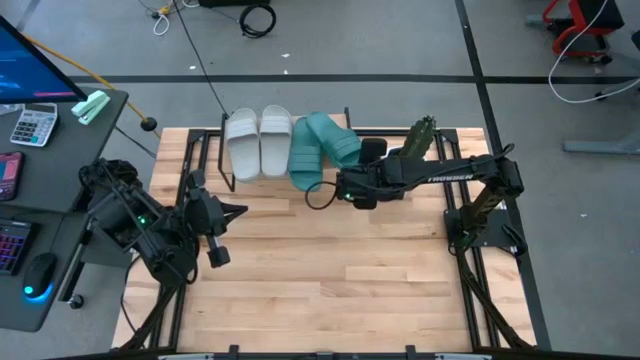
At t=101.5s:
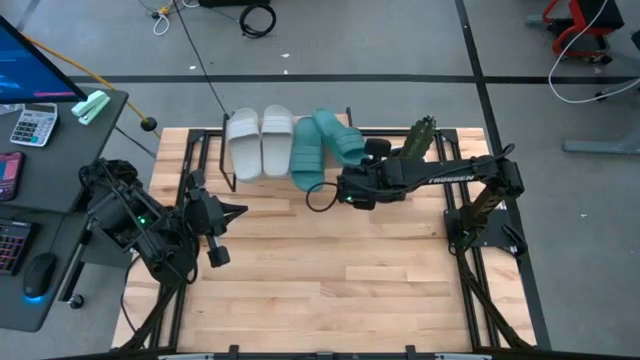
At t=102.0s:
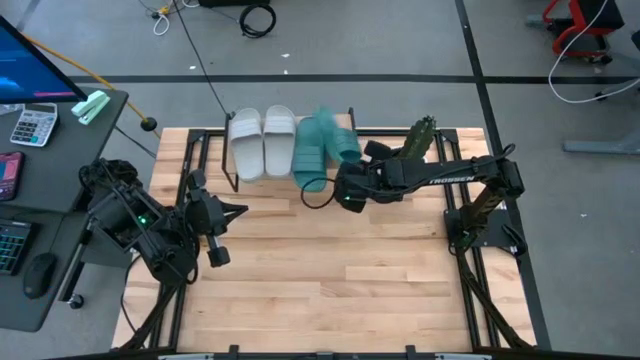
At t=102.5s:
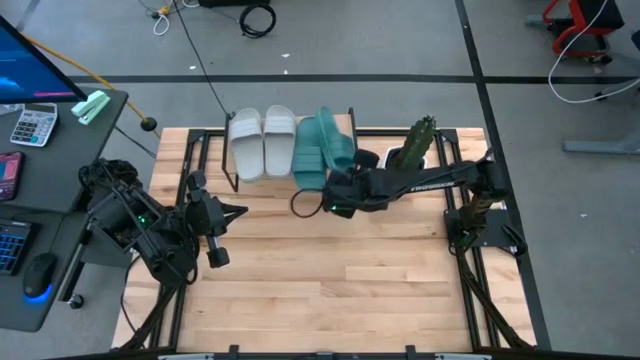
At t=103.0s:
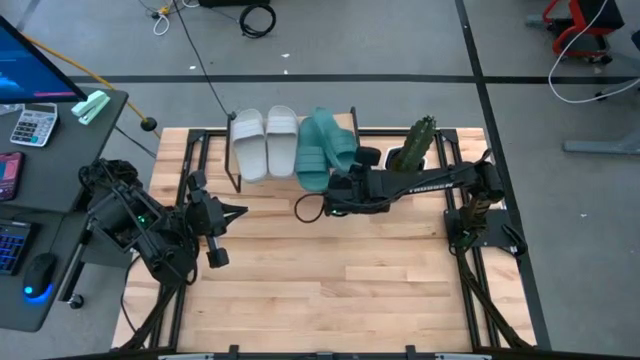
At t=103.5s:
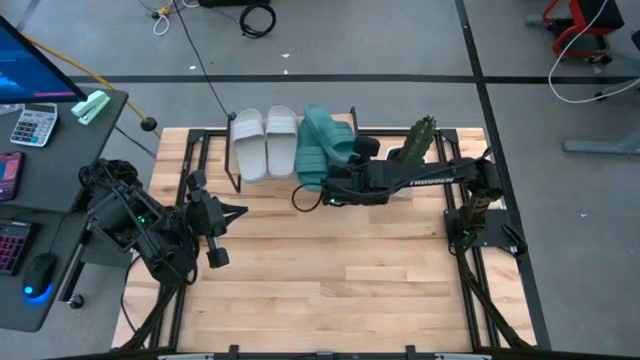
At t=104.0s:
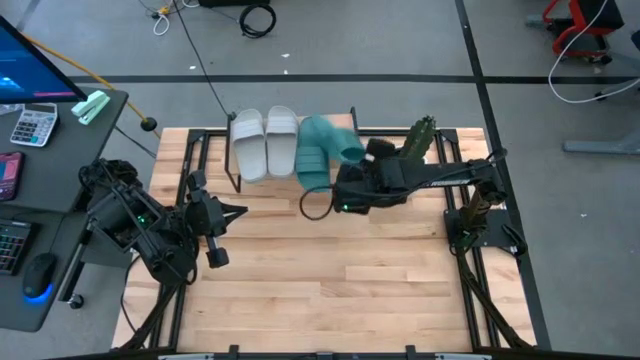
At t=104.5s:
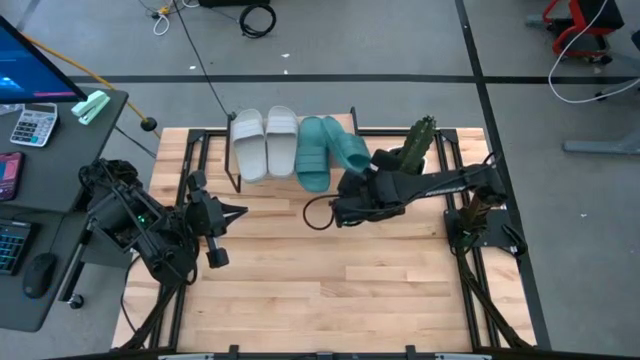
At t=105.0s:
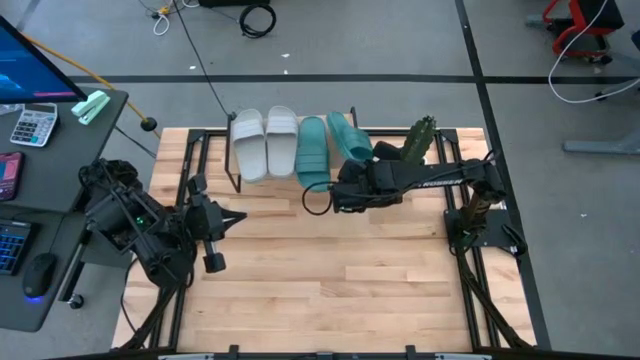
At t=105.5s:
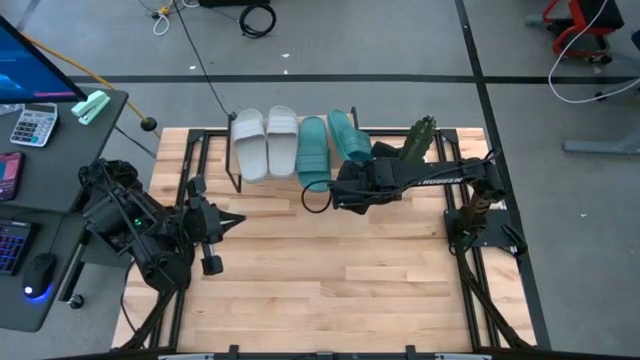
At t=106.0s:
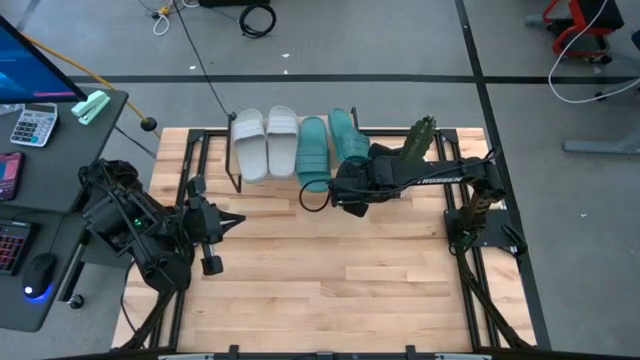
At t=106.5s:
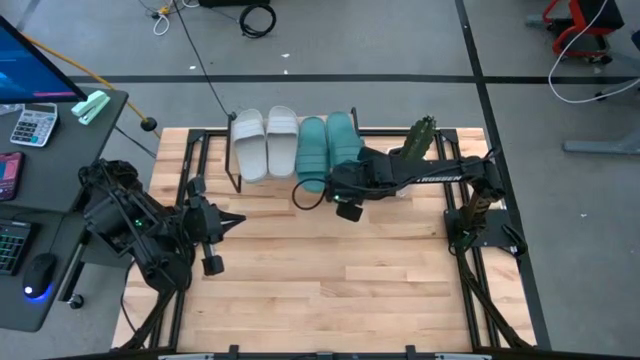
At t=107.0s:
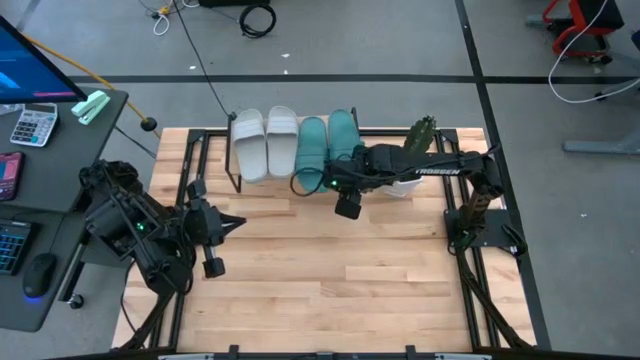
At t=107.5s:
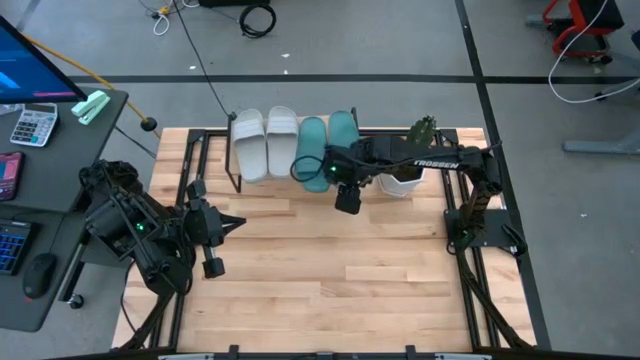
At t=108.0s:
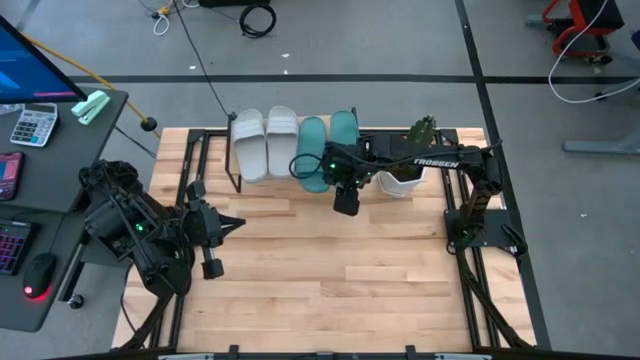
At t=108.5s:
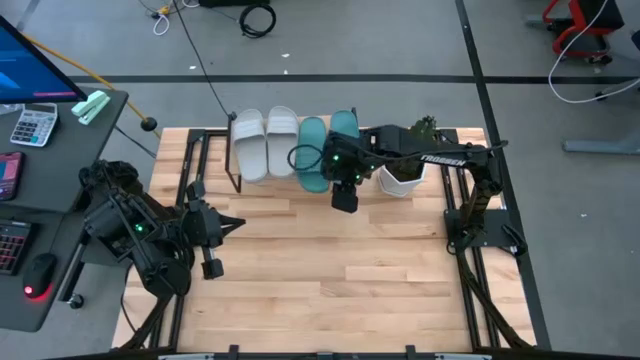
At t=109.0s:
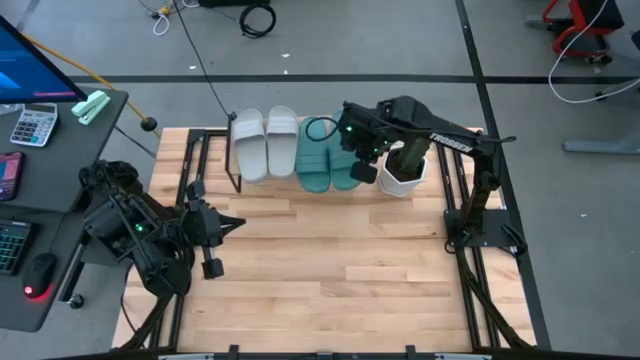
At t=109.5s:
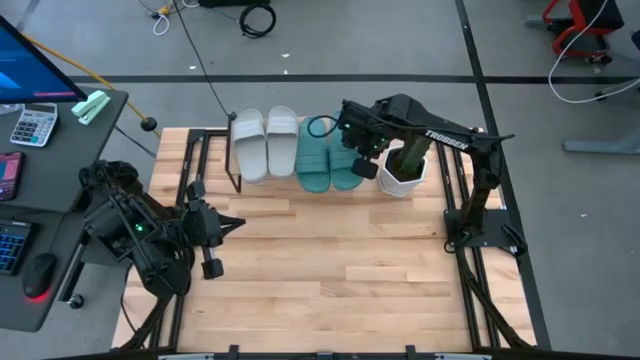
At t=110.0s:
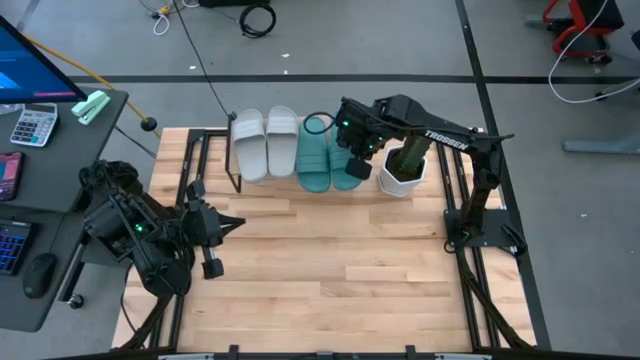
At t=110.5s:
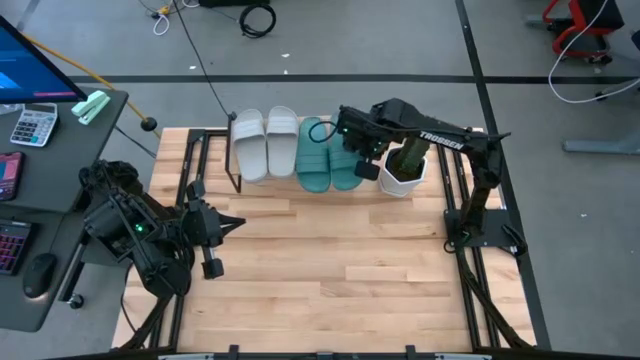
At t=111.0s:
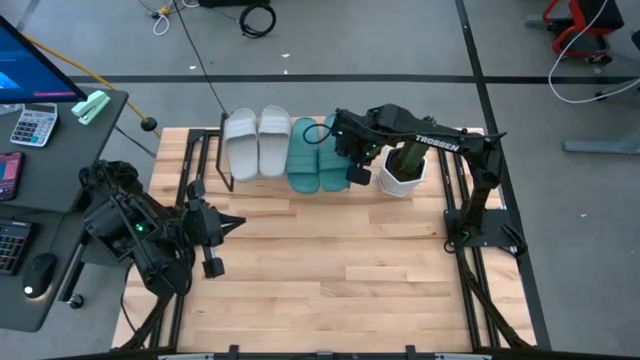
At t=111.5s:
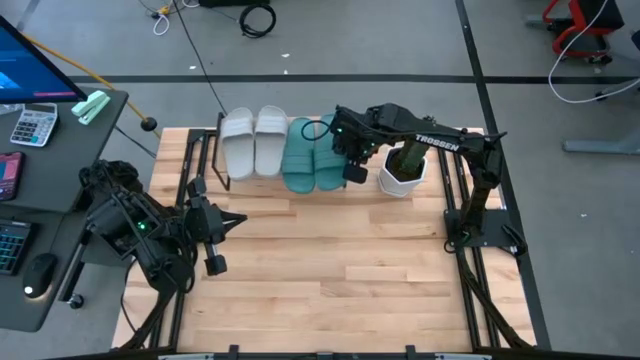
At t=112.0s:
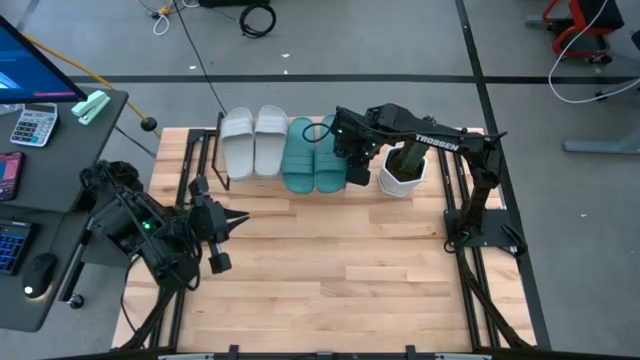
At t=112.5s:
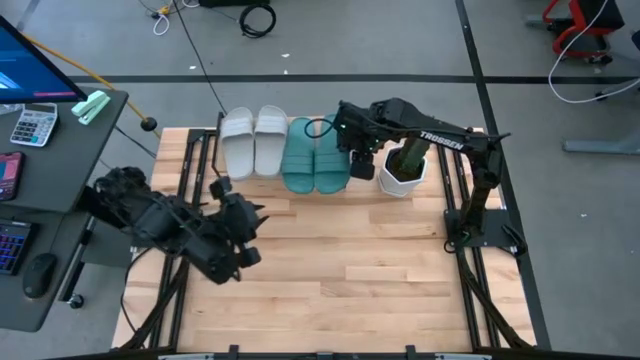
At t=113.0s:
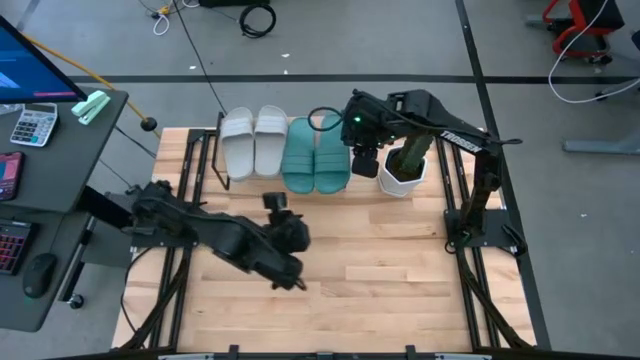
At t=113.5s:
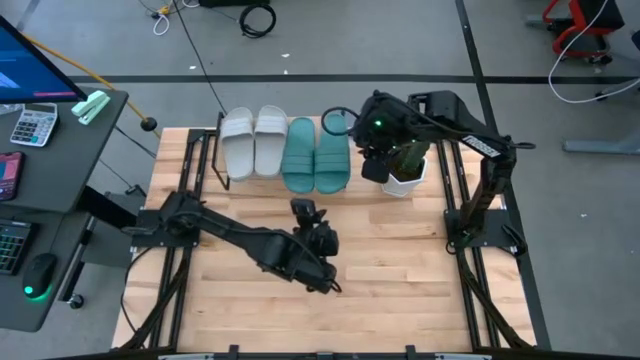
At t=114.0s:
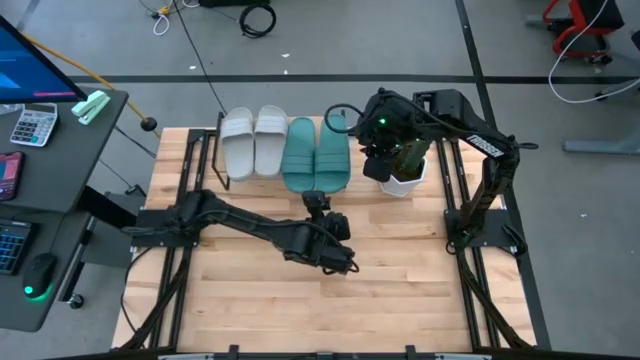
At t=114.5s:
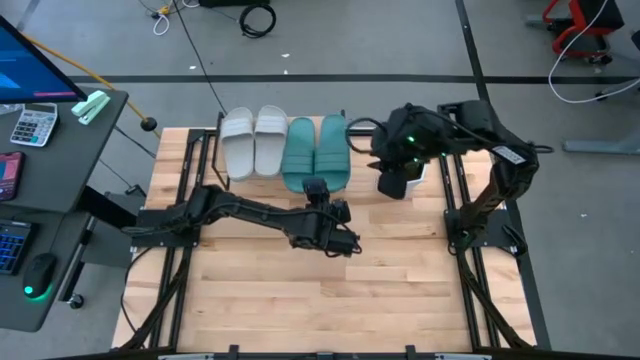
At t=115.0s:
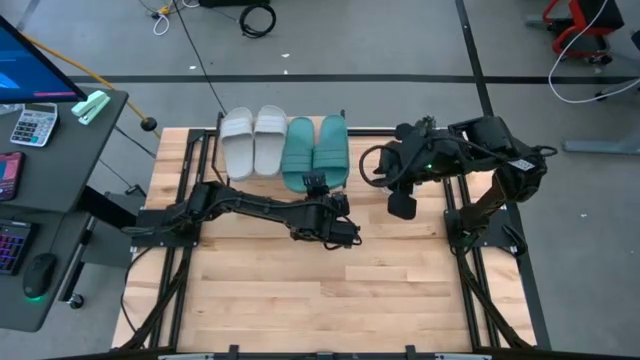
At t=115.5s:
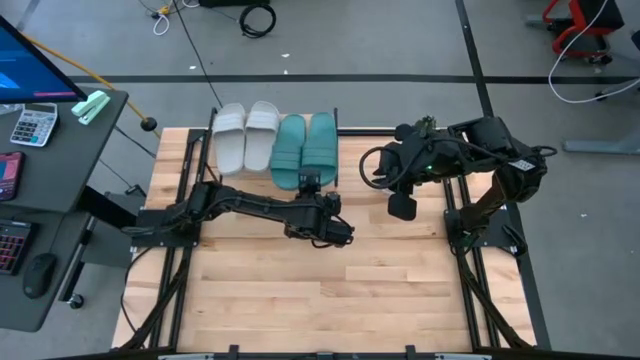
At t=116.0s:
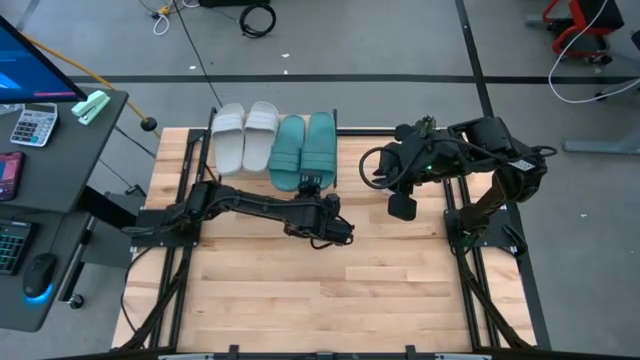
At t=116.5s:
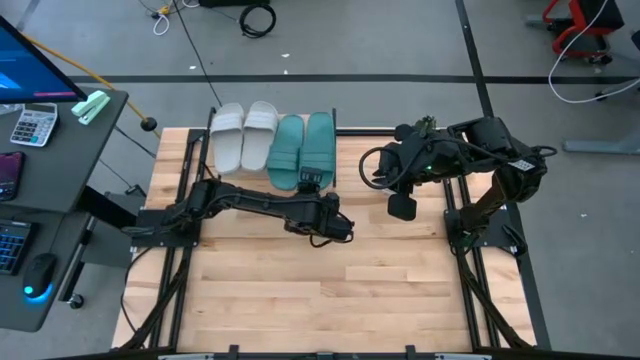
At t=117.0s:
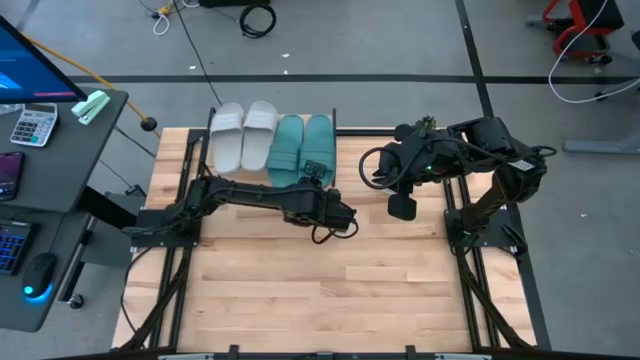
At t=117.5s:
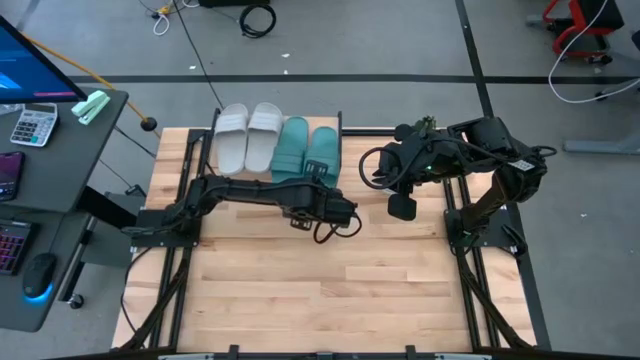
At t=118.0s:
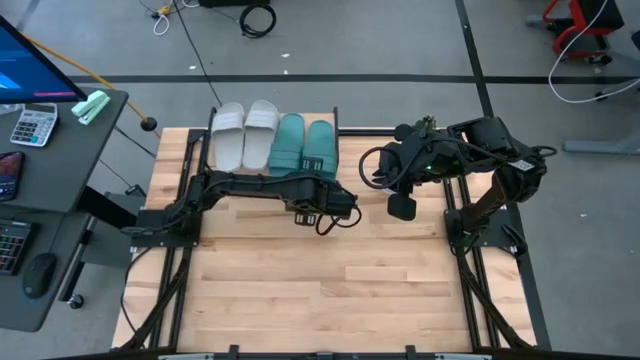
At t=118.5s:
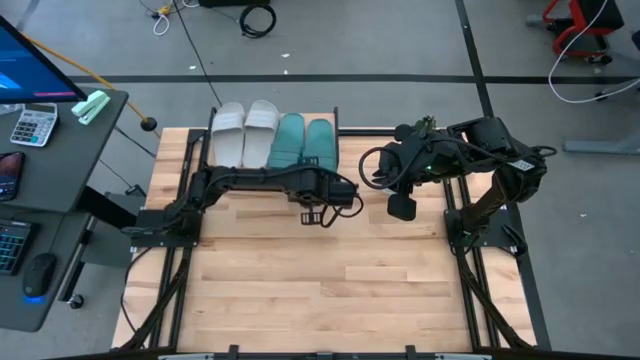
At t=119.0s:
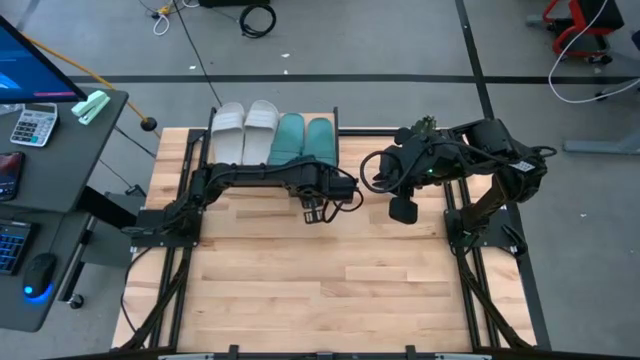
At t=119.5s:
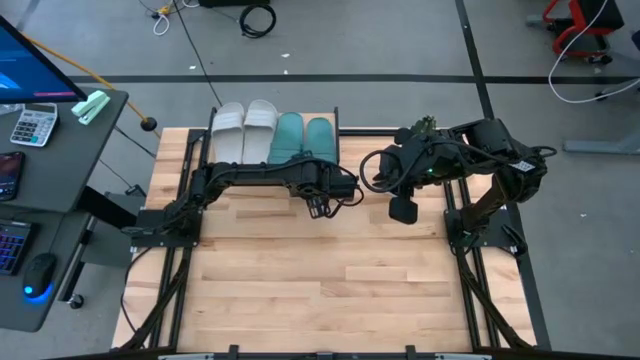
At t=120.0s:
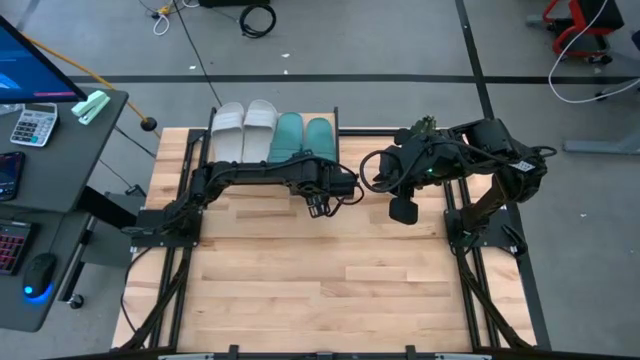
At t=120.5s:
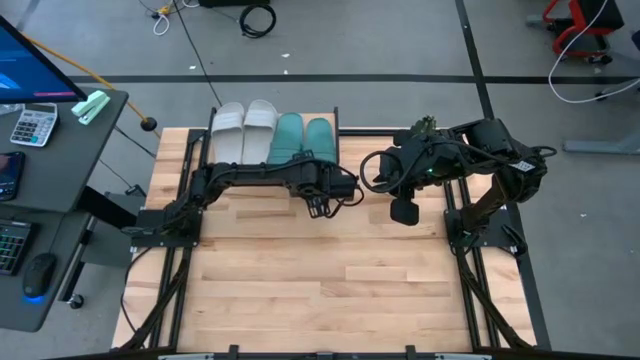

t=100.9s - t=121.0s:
Task: Pick and place slides into the shelf
Put the left green slipper on the shelf

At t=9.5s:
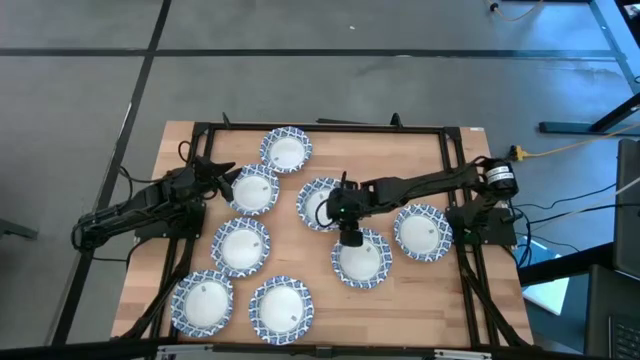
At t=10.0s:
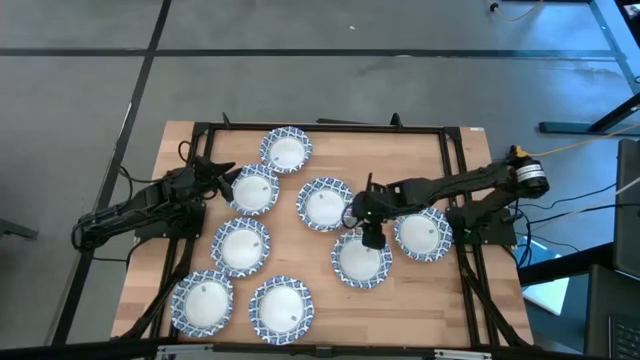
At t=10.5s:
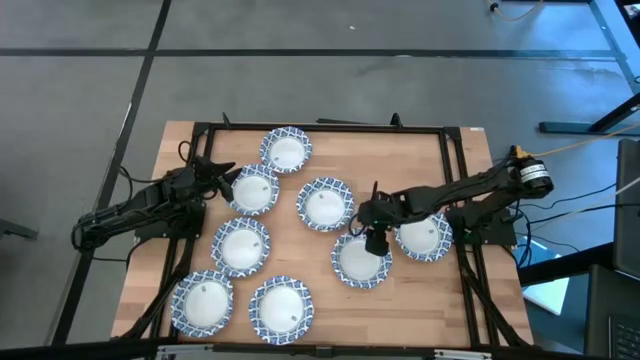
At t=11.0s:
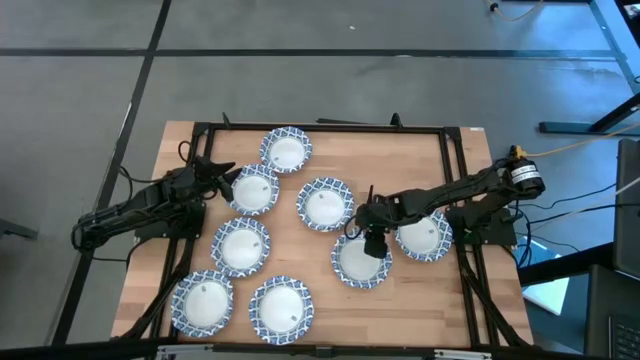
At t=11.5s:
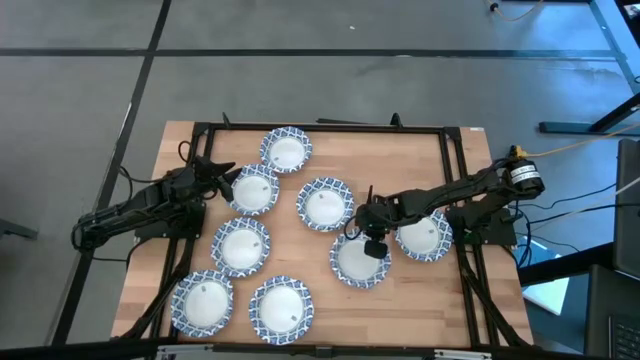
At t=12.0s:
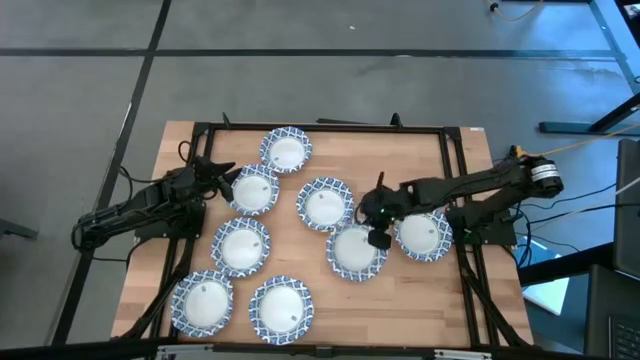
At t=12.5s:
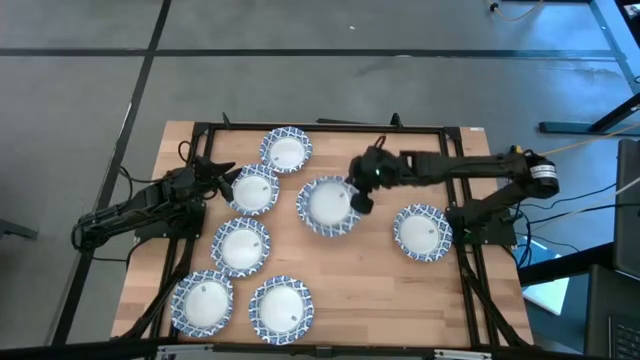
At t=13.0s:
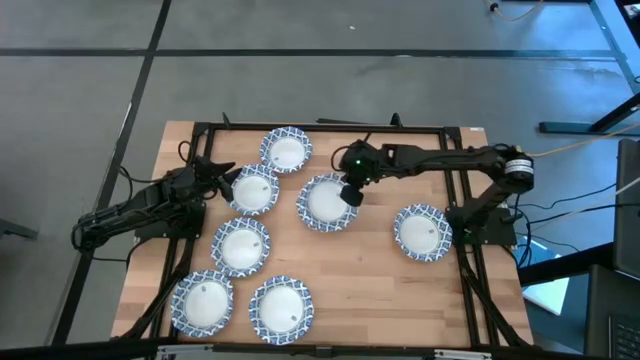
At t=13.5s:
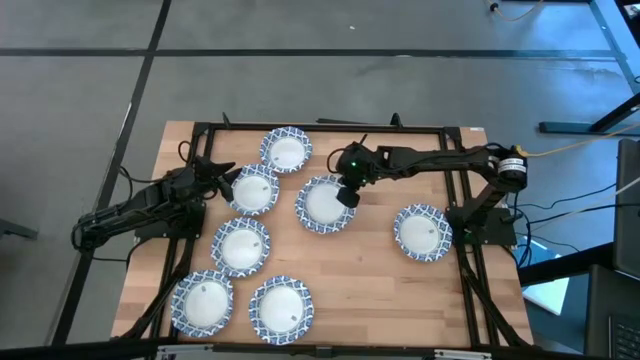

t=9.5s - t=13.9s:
Task: Nest bowls inside each other
Stack the white bowl on top of the other white bowls
